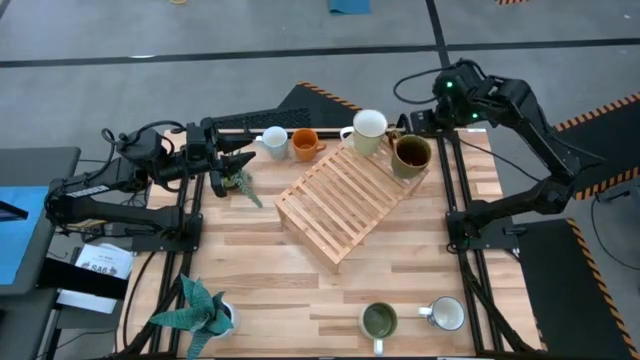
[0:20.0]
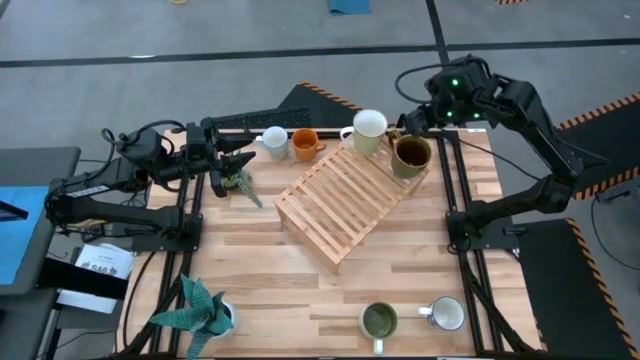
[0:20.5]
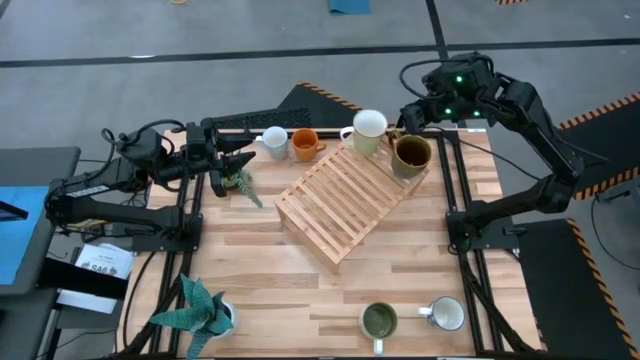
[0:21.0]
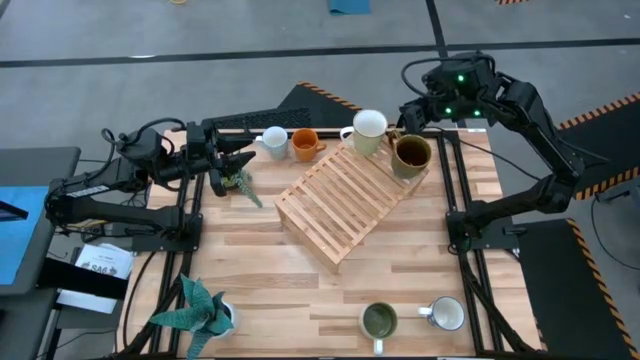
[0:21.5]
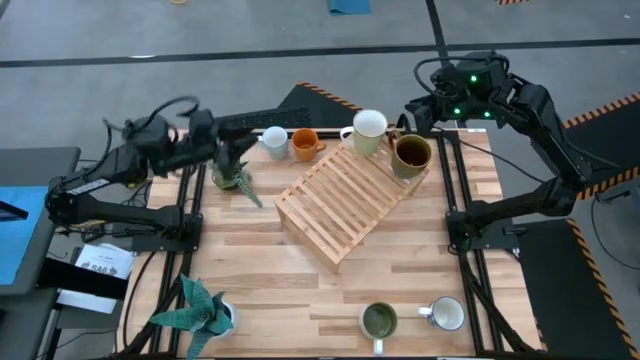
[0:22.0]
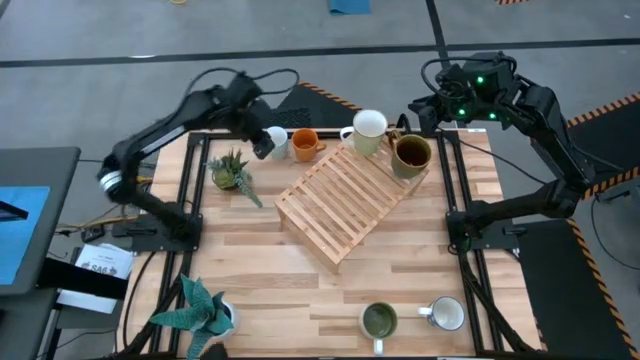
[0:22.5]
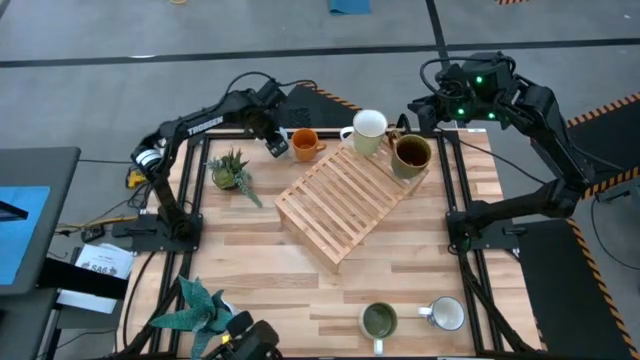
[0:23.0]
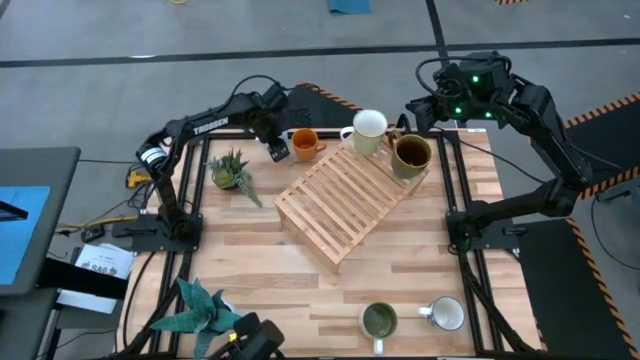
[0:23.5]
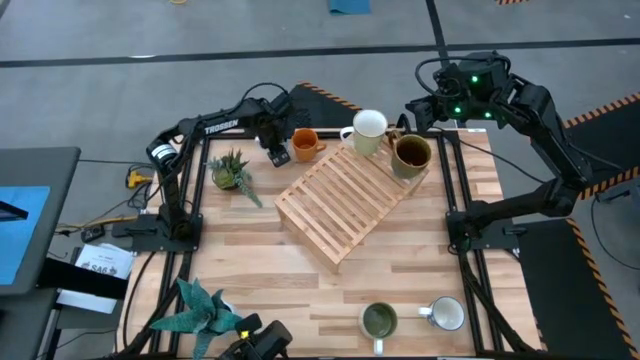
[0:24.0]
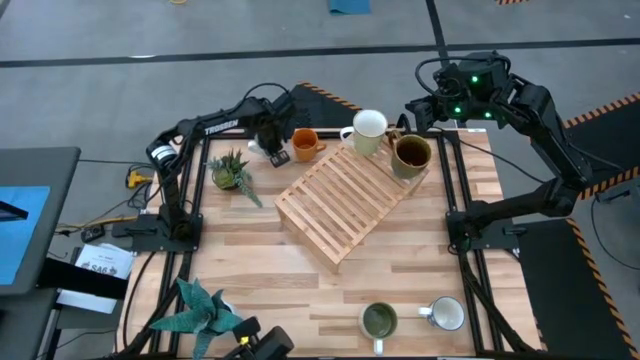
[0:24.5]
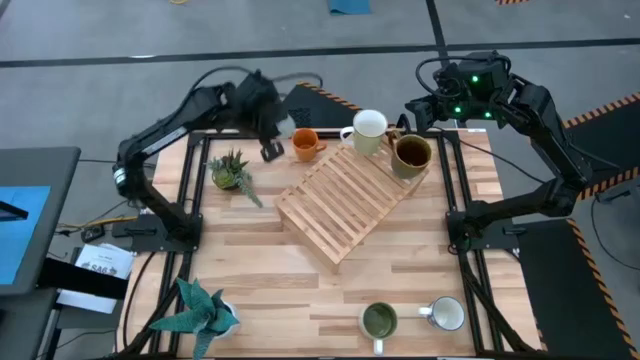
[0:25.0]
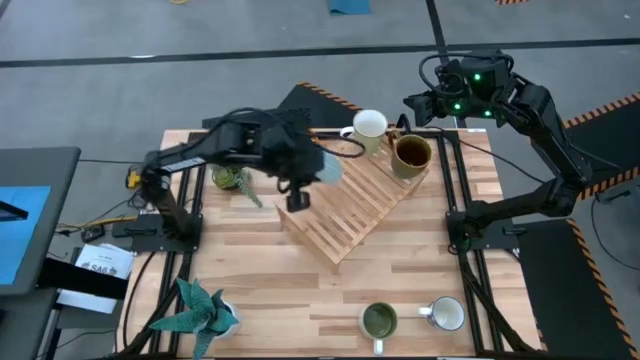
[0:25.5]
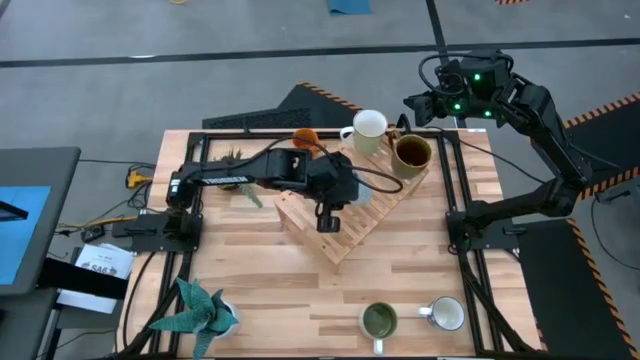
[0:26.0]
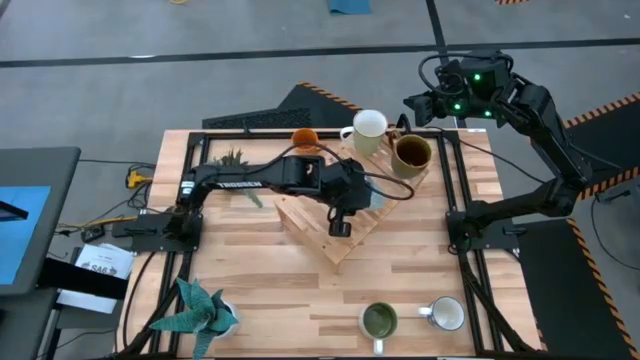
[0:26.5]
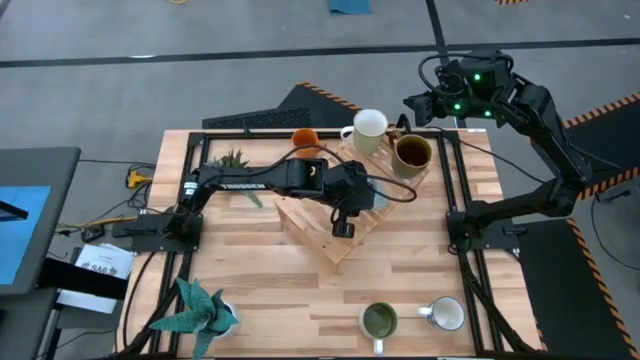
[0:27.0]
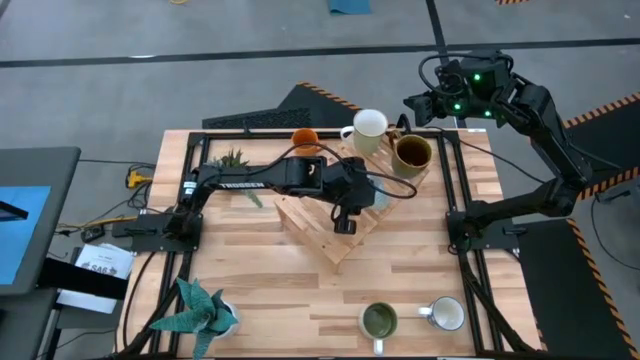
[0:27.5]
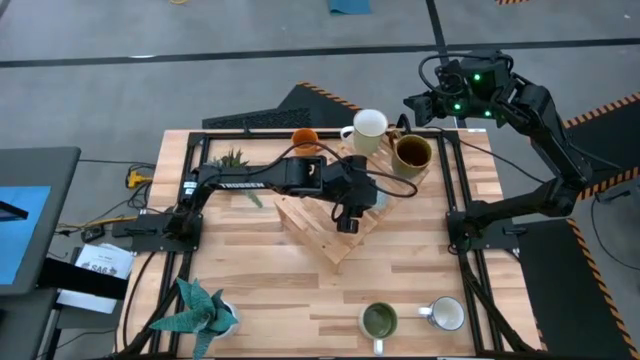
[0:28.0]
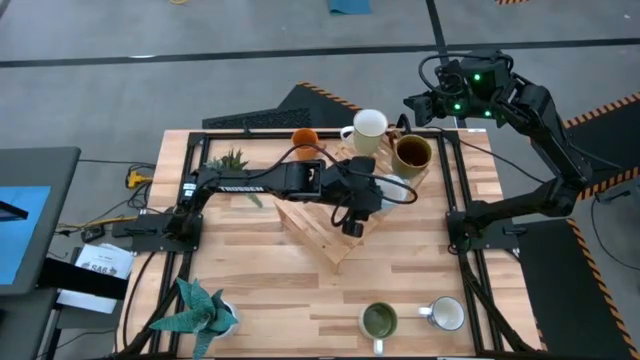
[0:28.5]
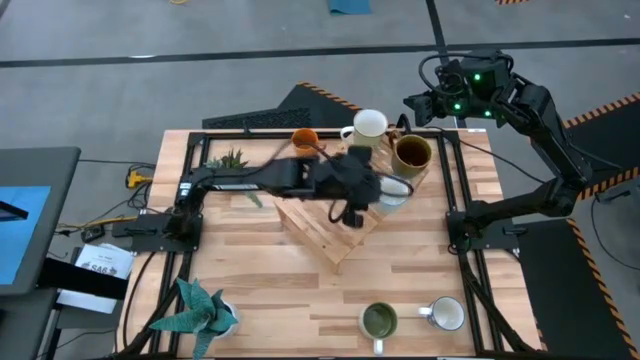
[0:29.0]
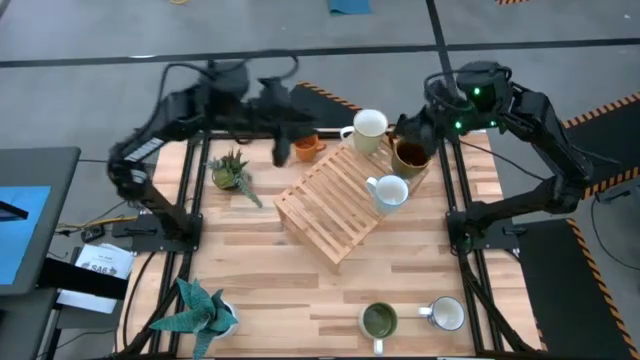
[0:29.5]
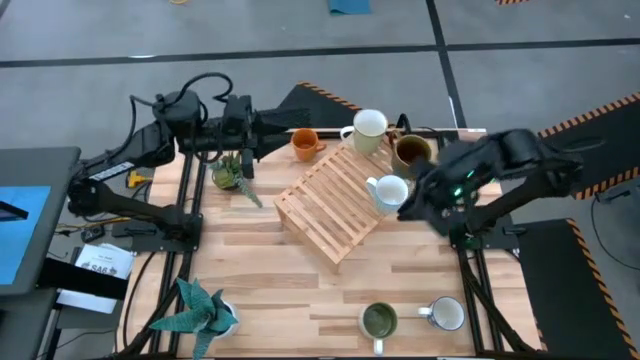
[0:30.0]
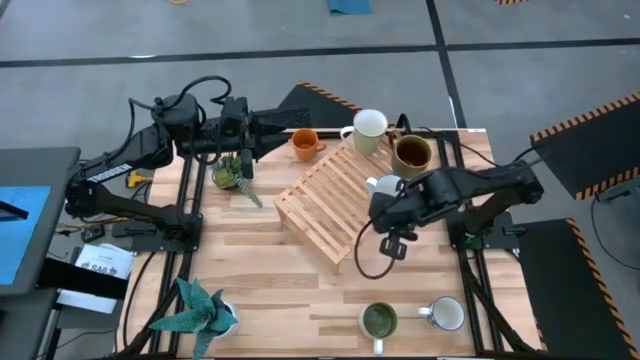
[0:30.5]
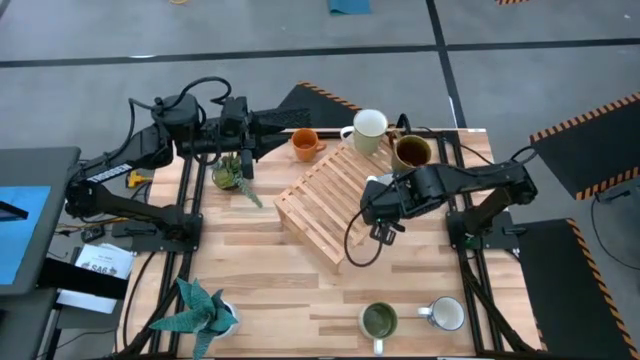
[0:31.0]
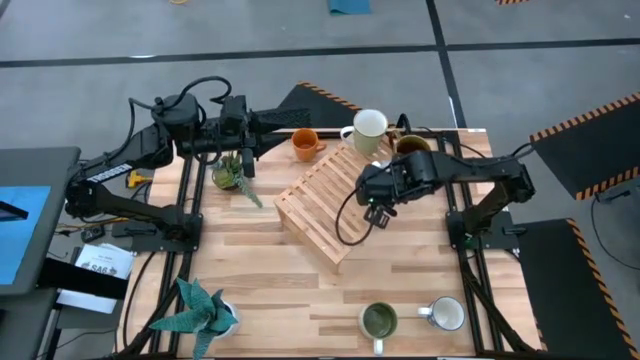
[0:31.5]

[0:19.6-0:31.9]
Task: Place coffee mugs
Put the light blue patterned mug on the shelf

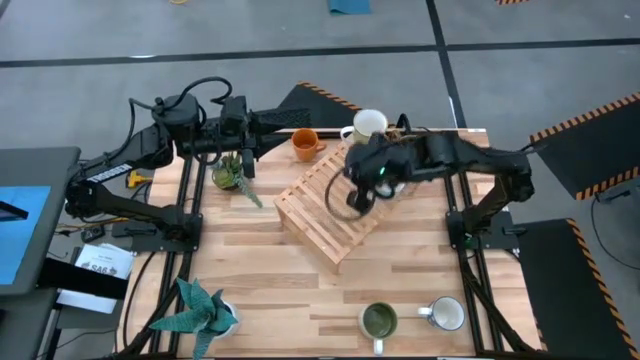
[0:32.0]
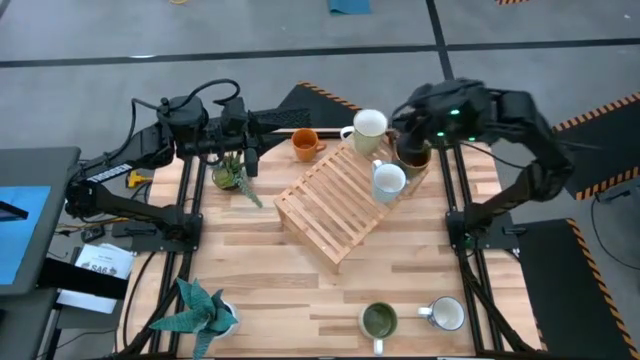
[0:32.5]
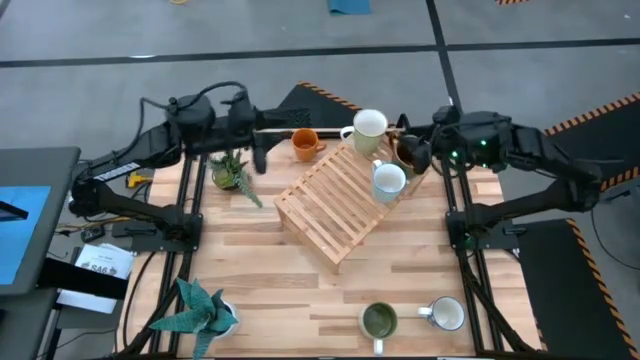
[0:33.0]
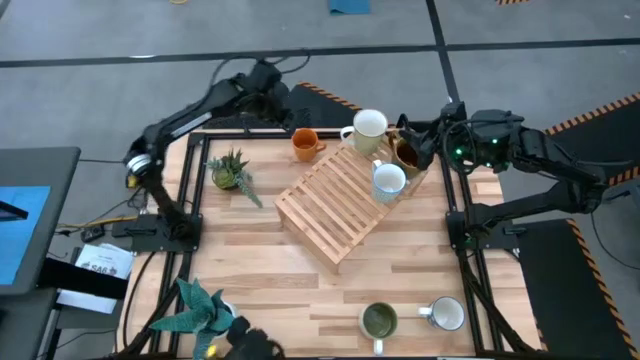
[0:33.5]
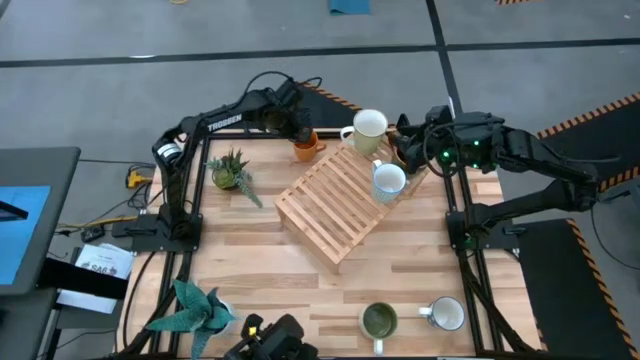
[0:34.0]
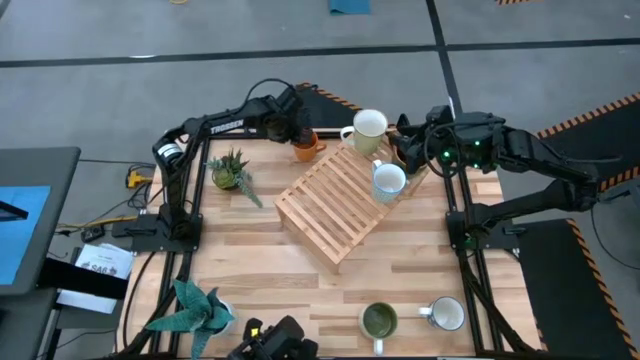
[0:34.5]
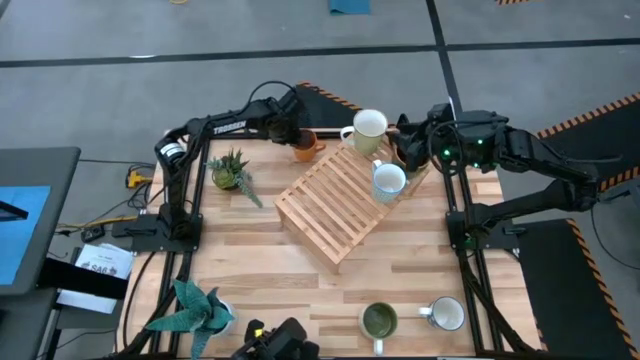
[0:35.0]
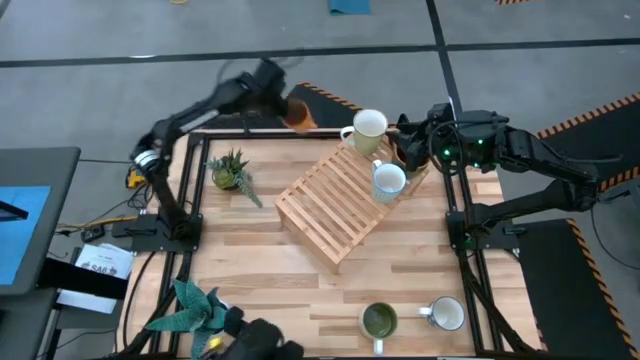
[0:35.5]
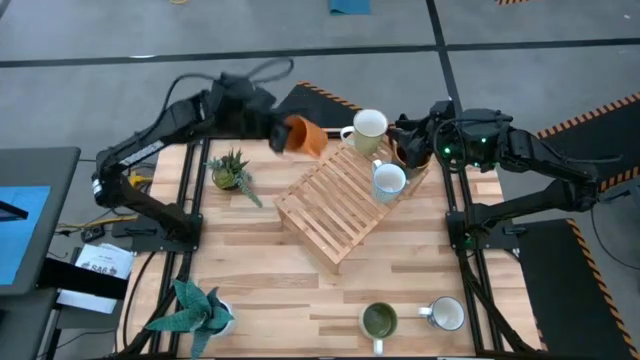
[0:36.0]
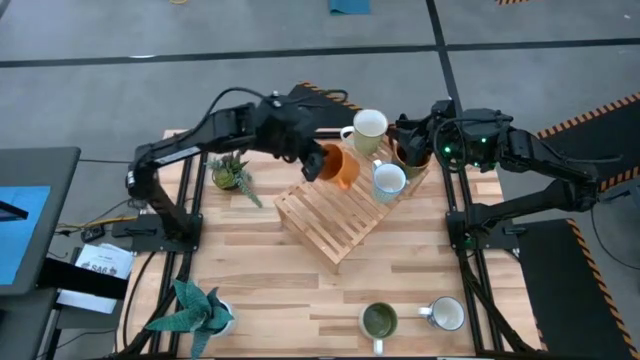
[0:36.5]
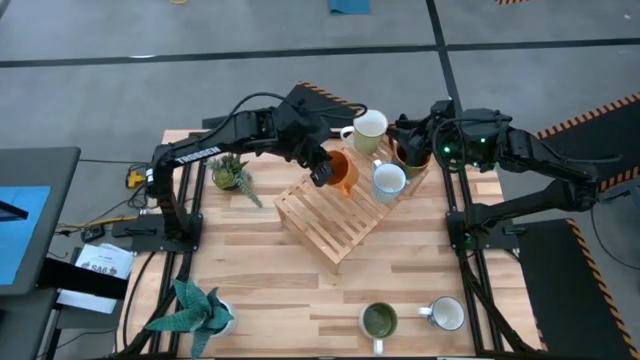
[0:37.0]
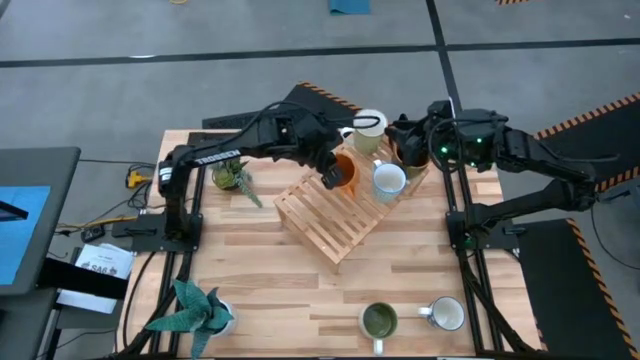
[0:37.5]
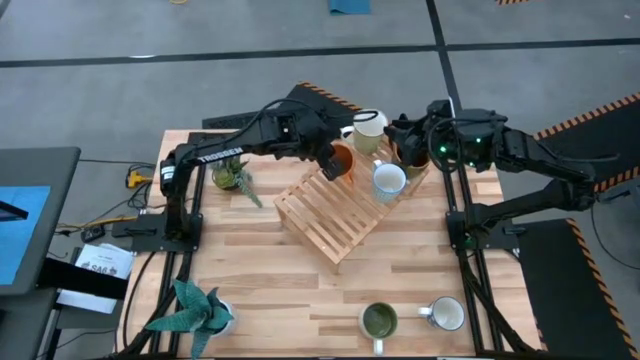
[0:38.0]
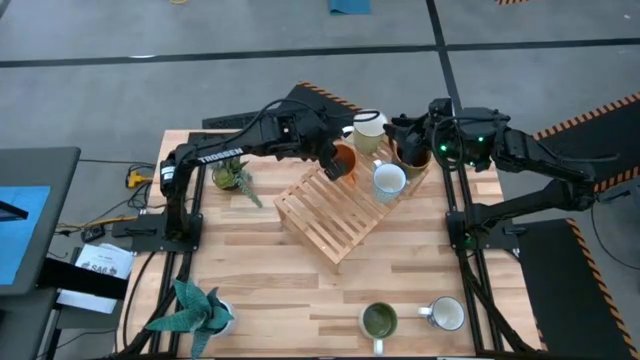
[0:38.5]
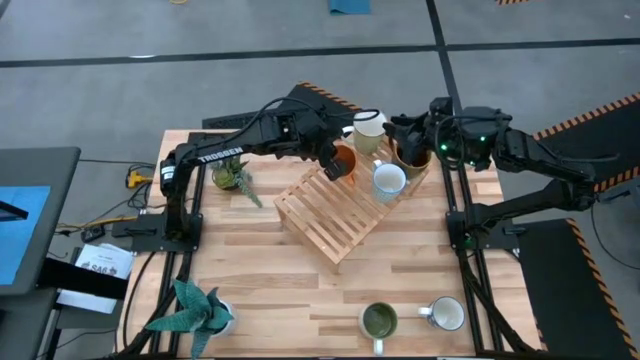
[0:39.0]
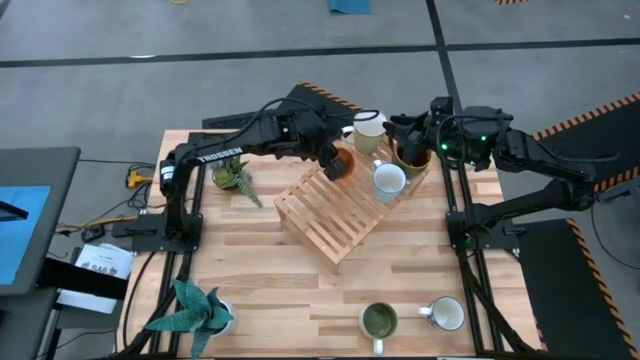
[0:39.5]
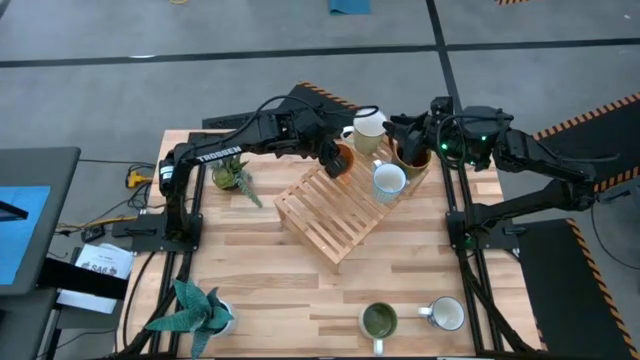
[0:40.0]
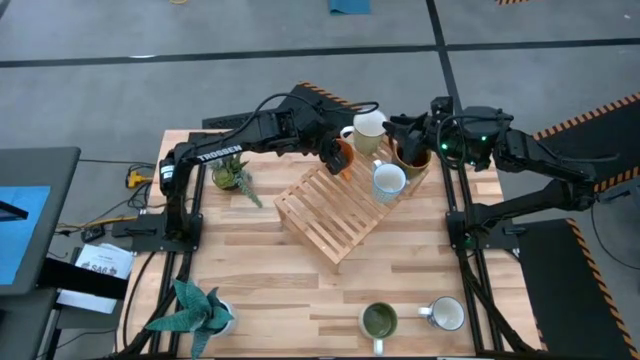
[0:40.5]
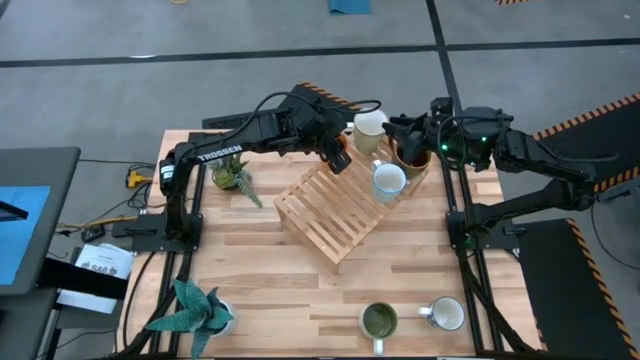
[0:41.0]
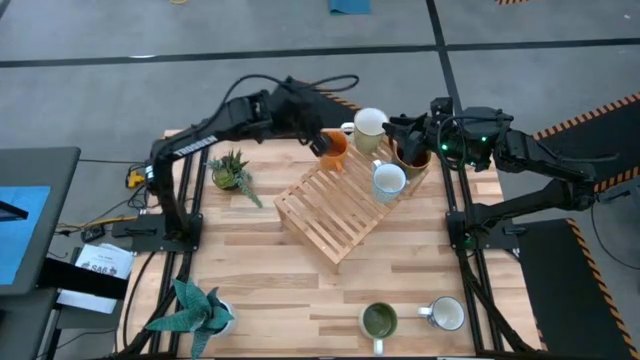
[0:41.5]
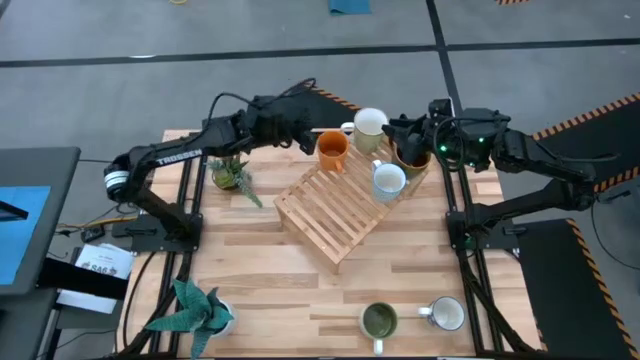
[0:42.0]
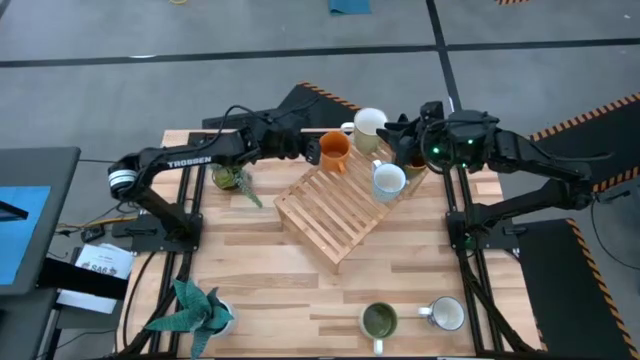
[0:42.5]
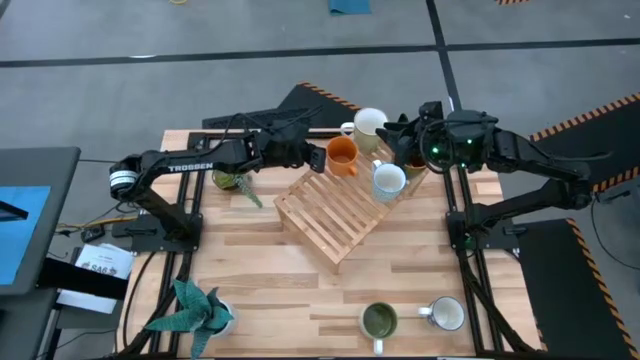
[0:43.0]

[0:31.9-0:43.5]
Put the orange mug on the shelf
